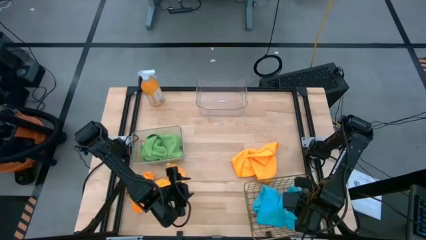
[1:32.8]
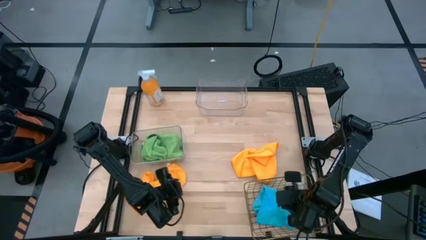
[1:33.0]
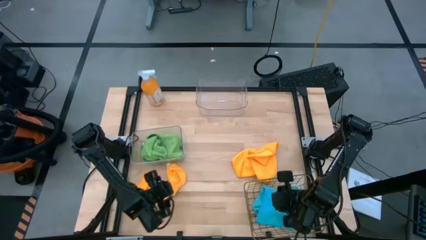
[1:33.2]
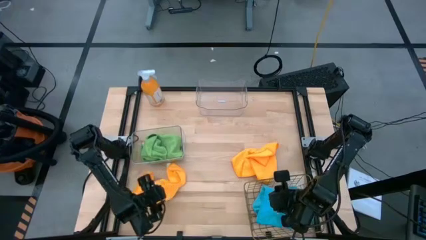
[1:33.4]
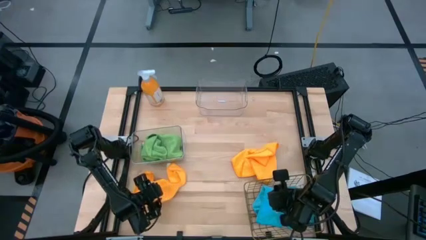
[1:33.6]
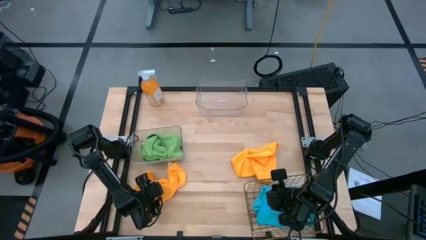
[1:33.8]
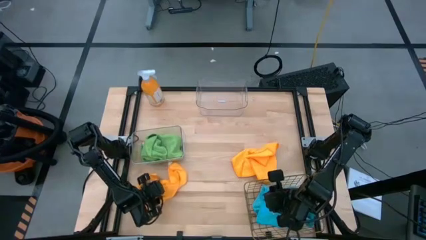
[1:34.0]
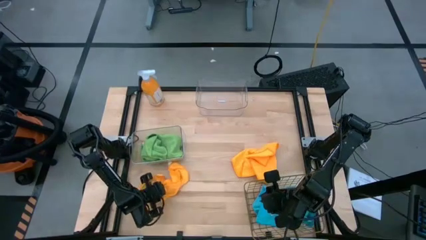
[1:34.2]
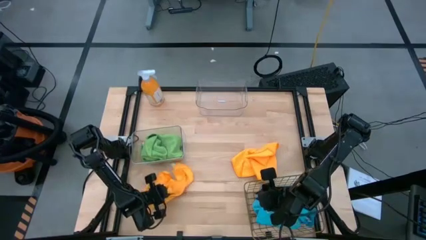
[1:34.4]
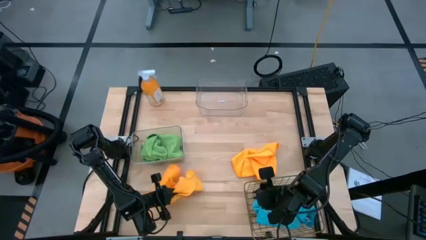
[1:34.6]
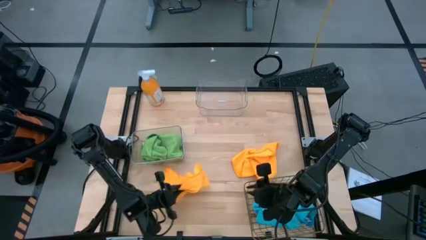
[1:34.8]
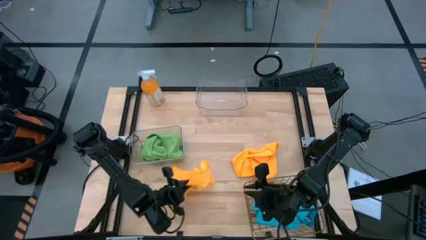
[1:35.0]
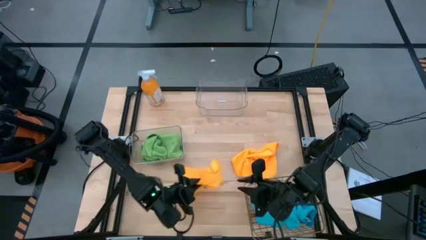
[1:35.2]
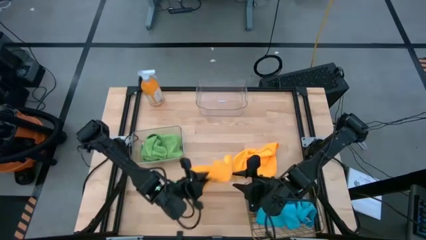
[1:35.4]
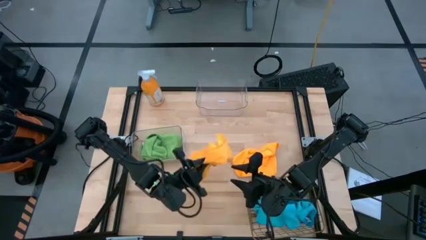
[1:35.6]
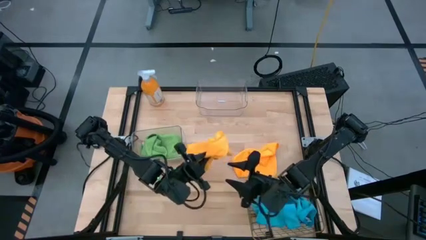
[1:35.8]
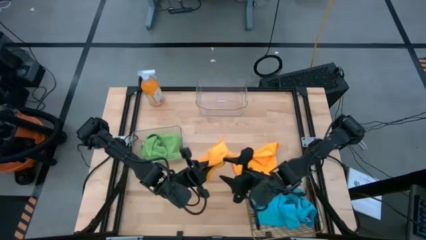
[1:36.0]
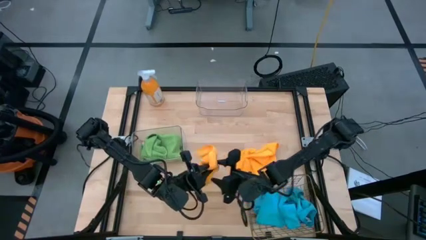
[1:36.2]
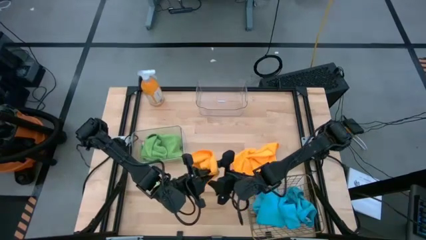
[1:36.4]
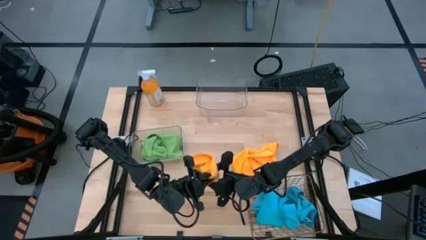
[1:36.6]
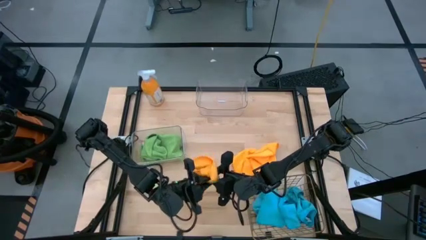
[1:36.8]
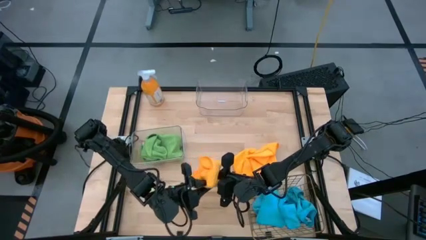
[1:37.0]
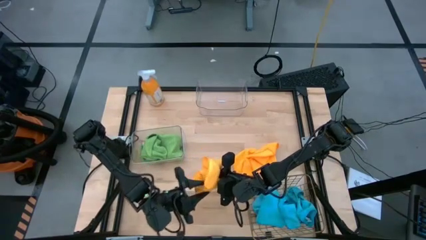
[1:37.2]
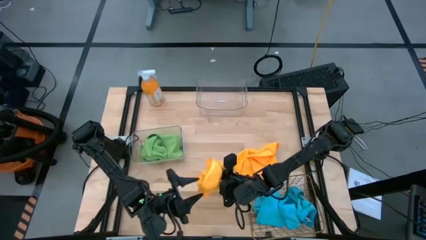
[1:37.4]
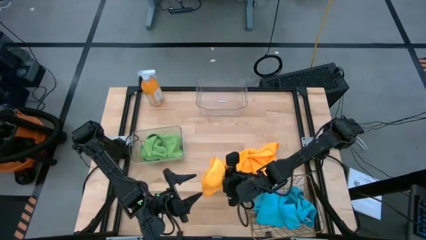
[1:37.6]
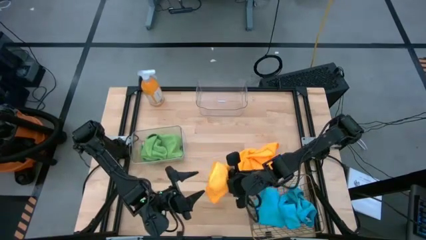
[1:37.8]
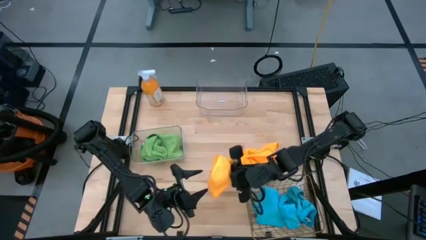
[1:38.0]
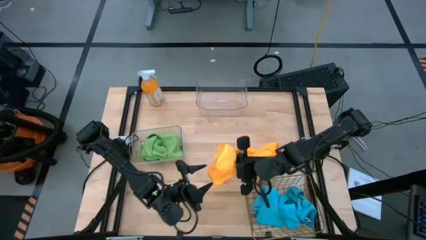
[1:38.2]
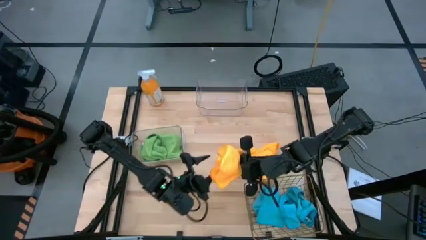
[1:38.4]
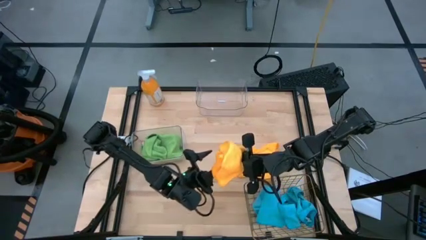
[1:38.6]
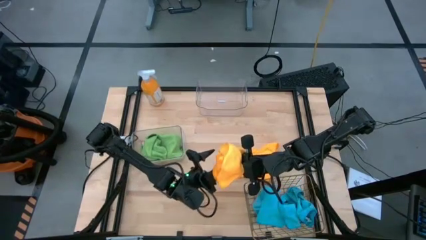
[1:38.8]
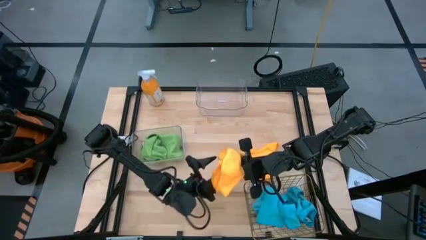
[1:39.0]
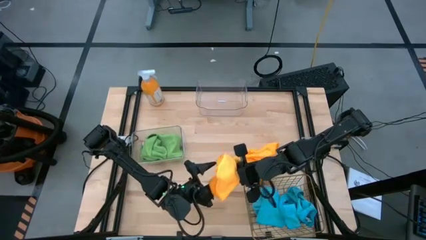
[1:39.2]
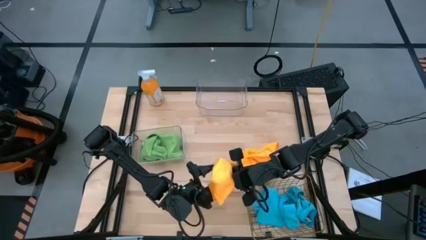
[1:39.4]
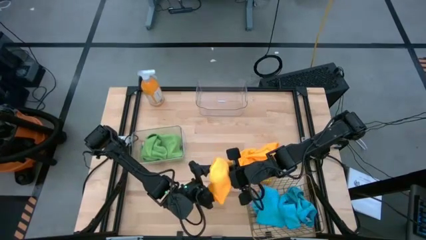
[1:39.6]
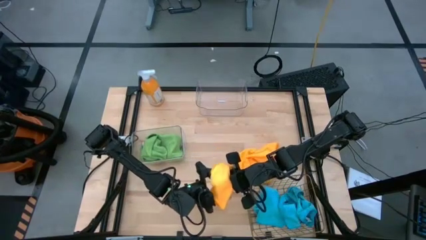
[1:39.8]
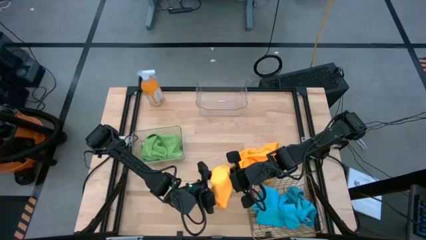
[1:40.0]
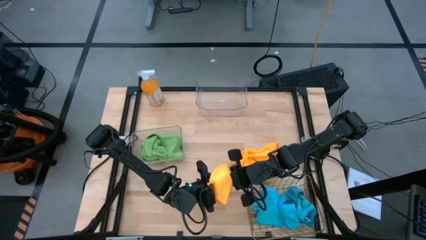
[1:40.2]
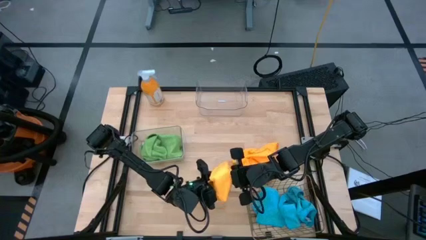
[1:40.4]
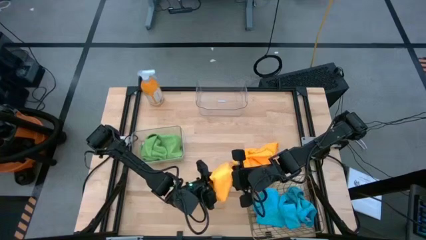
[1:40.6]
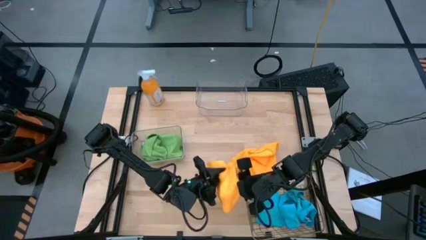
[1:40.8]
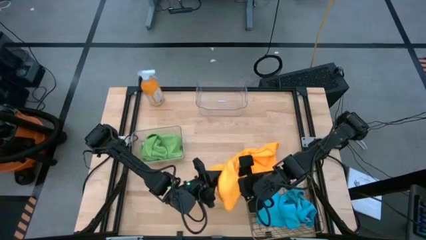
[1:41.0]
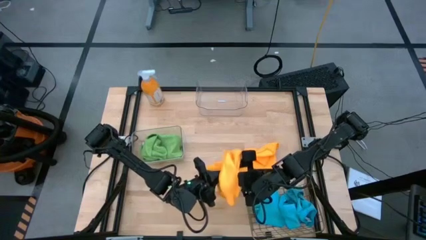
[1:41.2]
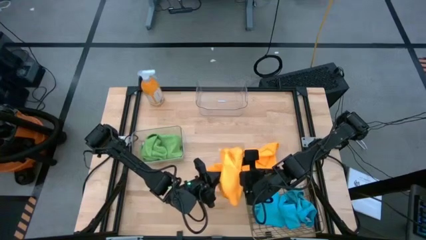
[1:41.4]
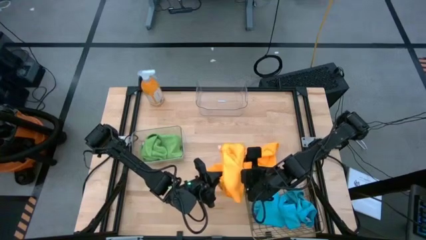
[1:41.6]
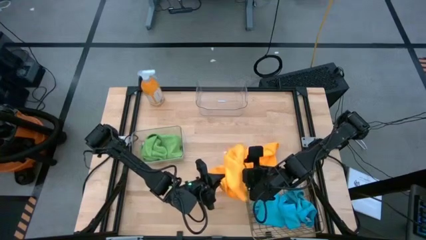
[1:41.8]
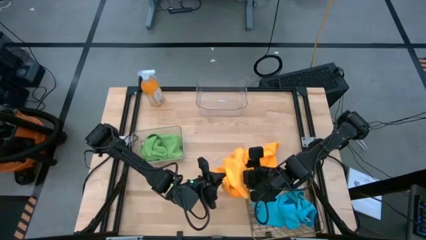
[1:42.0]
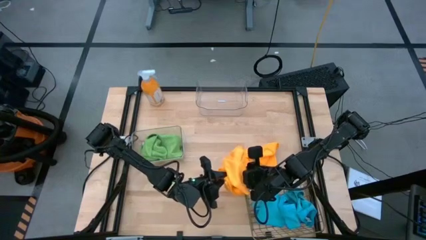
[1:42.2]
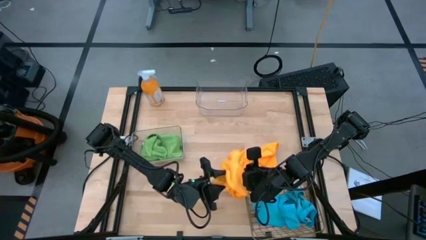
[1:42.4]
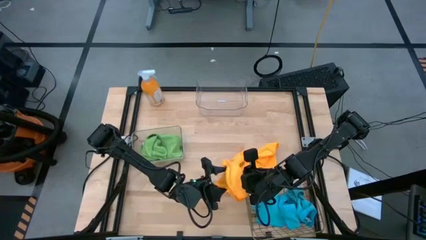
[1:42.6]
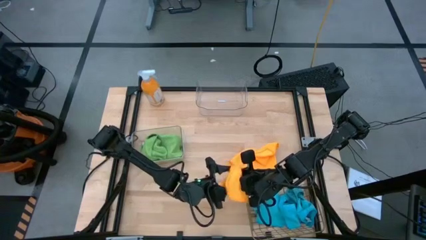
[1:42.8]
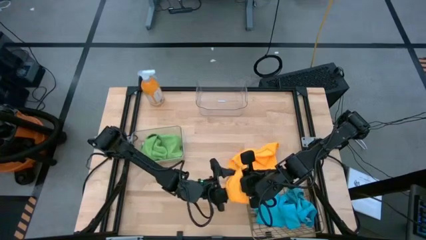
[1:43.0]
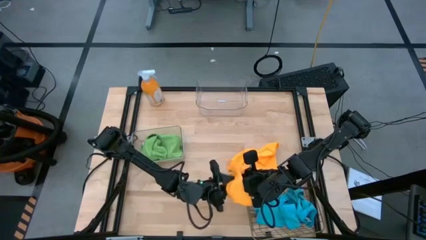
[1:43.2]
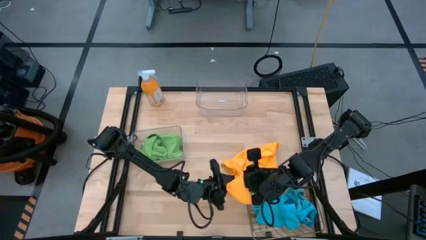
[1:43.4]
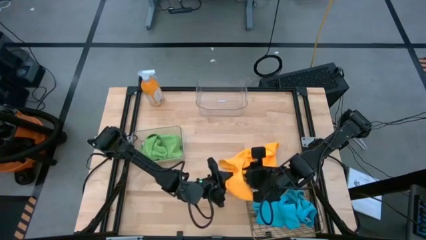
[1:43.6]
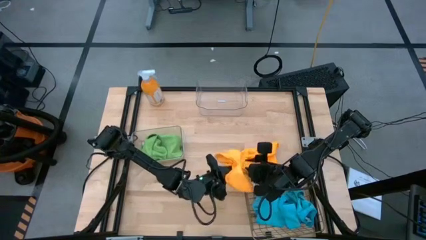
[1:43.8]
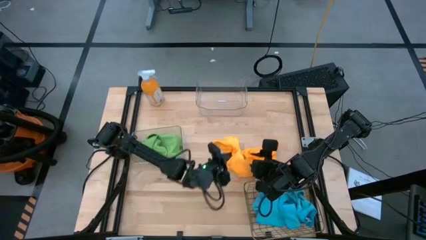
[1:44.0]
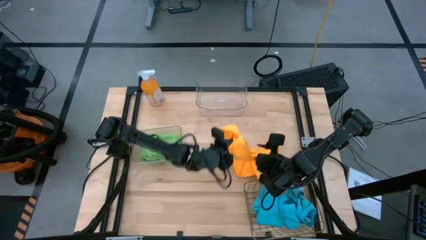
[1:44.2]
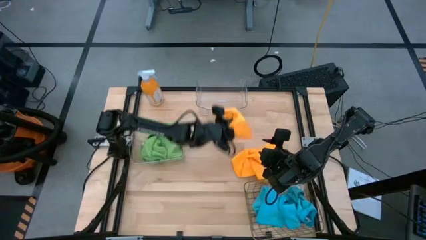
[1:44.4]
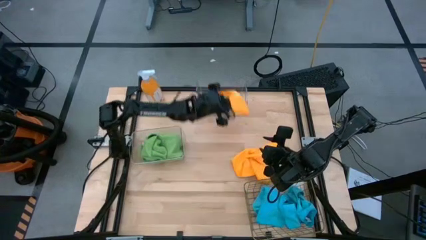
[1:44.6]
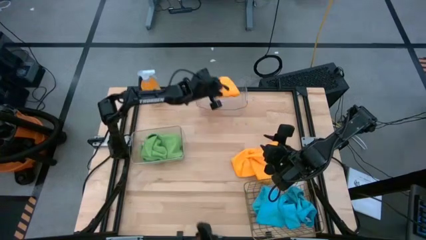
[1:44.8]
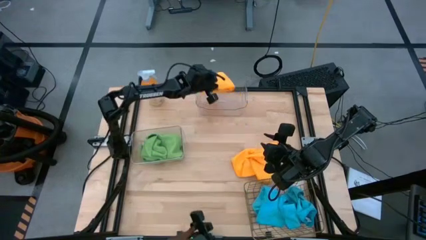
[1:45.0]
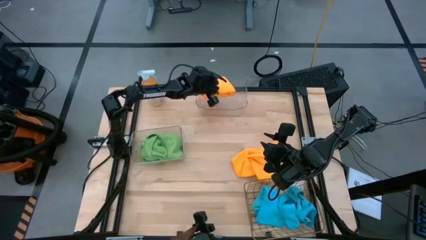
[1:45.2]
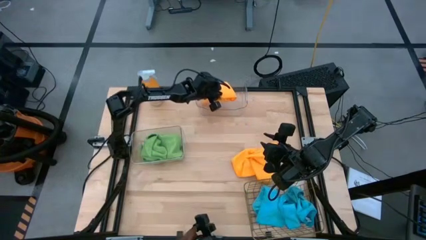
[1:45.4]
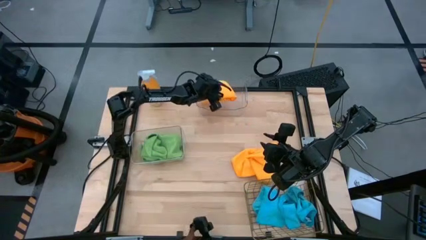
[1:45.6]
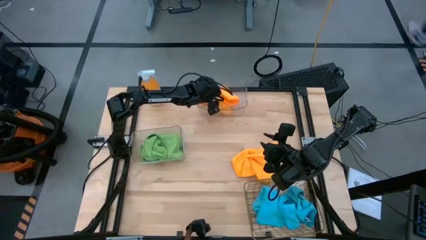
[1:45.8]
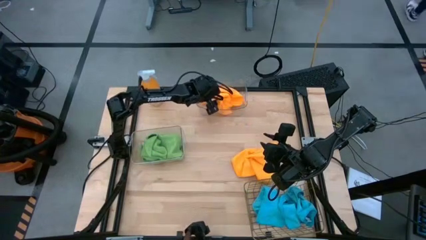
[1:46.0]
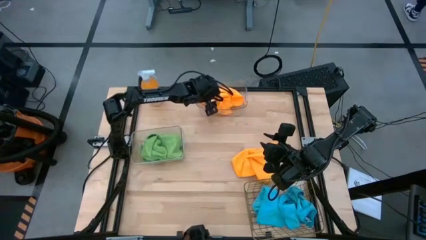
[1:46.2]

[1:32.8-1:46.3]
Task: Sort microfiber towel by color & place in baskets
Put the bottom left orange microfiber towel into the top transparent bin

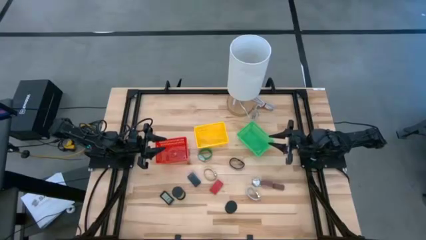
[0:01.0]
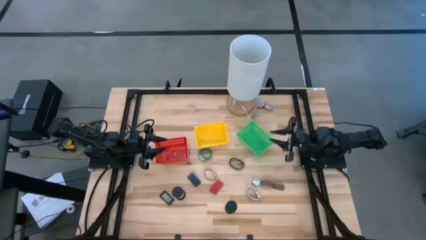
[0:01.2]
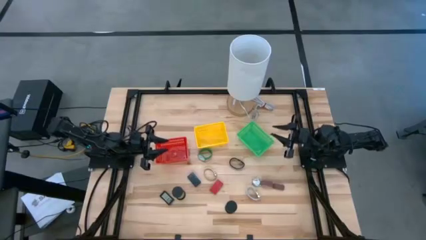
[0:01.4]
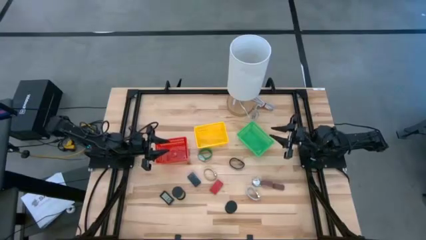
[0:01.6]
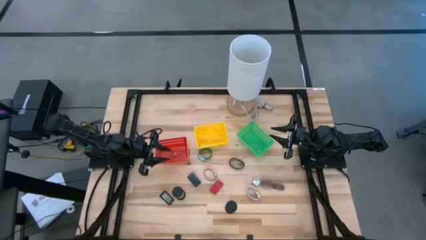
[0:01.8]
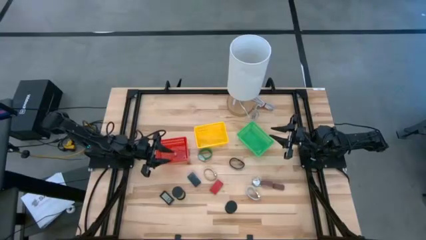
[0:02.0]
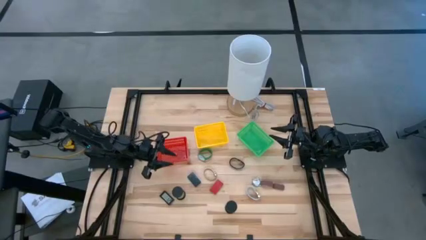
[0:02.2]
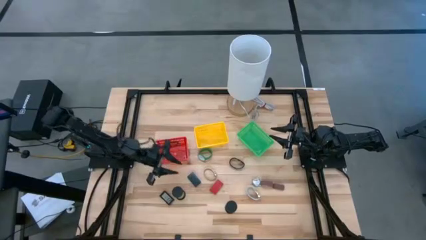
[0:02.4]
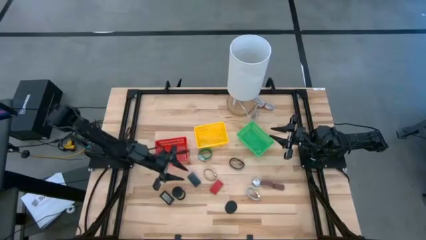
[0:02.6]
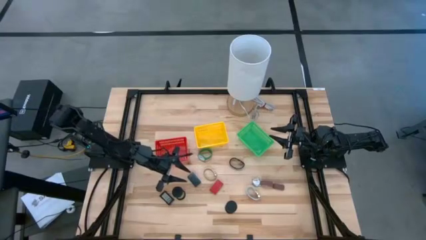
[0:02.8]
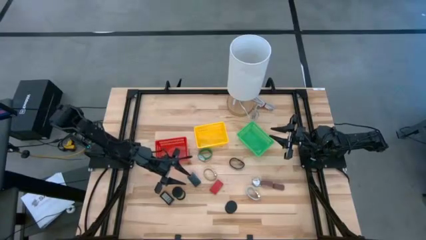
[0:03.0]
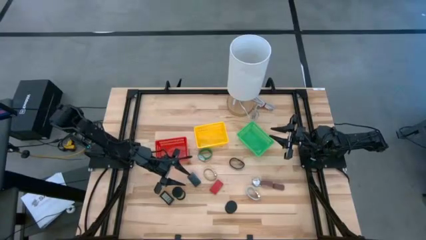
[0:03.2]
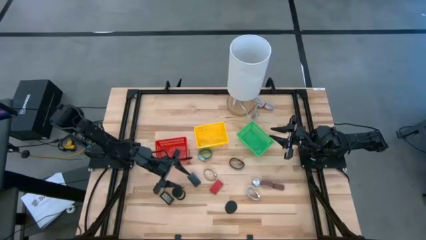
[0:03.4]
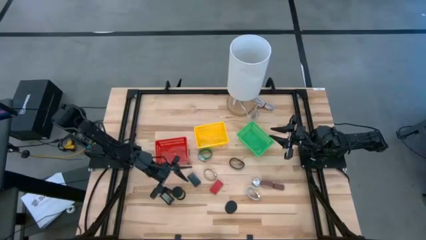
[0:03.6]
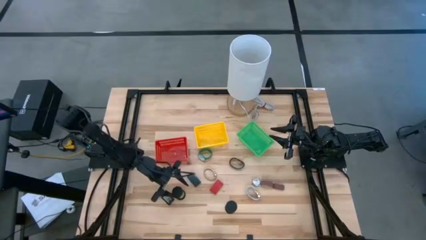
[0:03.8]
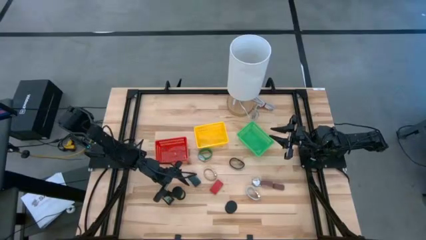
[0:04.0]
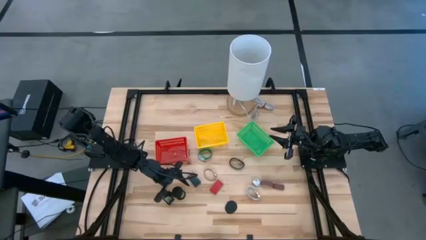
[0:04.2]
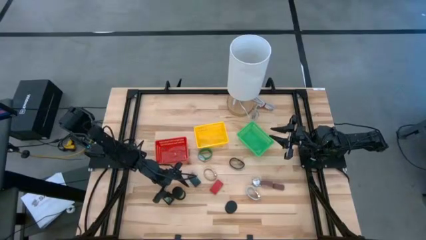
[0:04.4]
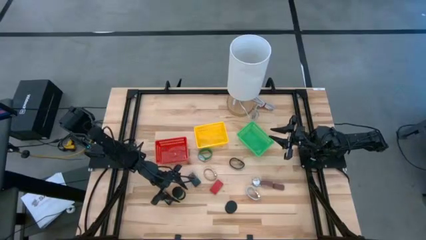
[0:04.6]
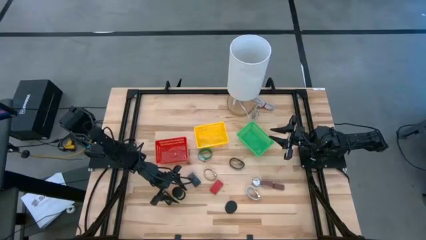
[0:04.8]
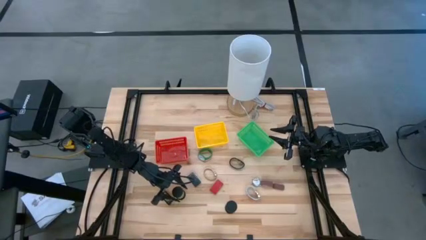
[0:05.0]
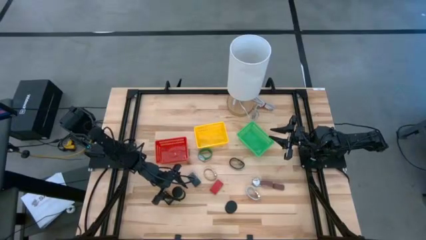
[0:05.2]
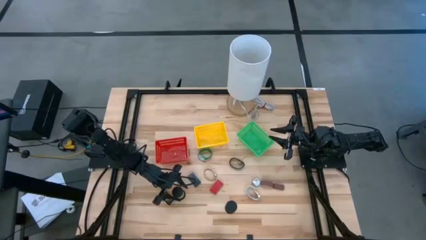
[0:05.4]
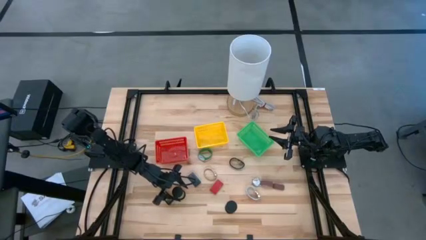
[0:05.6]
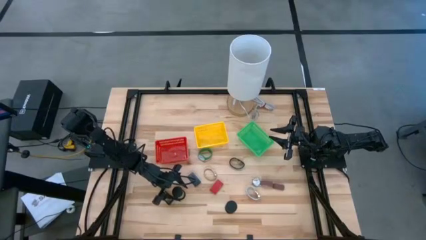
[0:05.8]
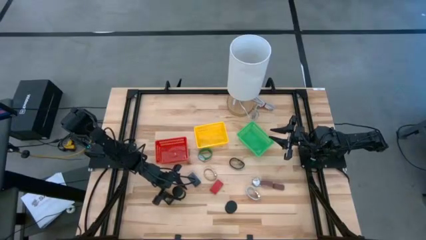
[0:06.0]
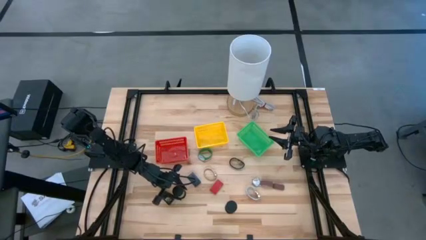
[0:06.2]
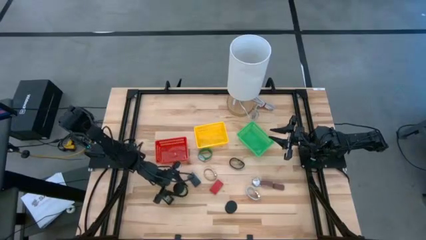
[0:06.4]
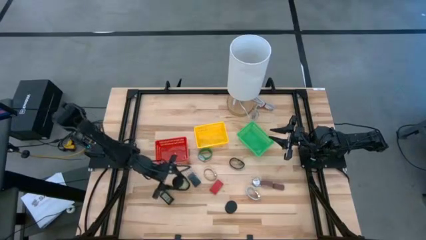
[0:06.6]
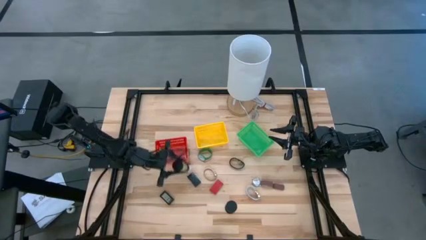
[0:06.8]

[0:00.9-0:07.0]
Task: Pick & Place Office items
Put the left black hourglass into the red basket
